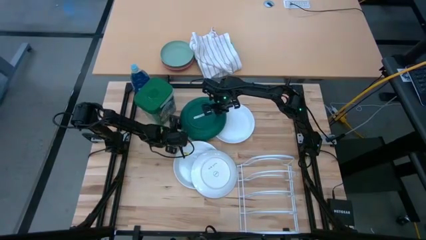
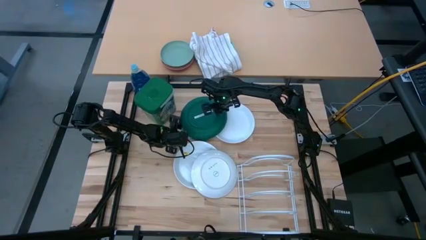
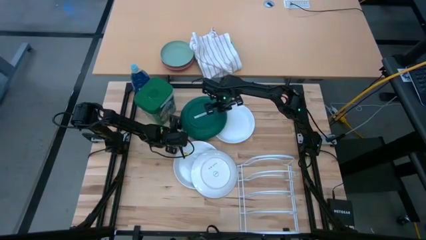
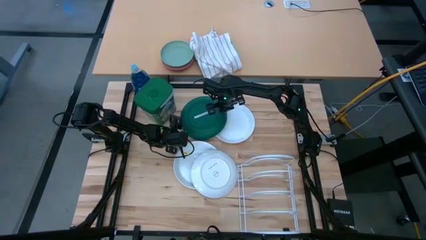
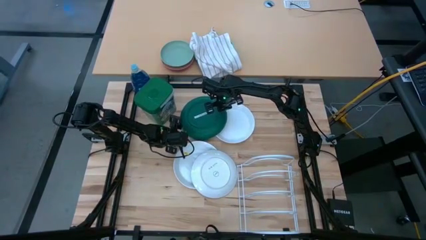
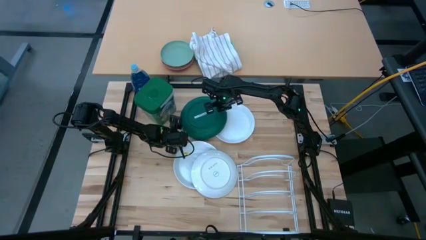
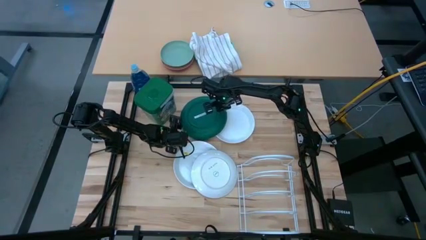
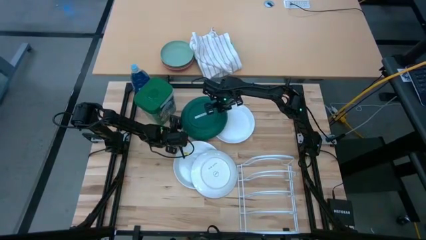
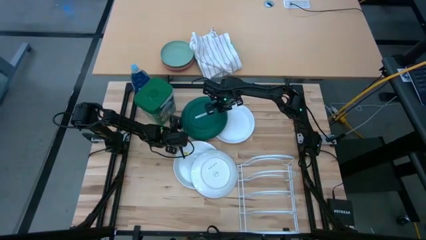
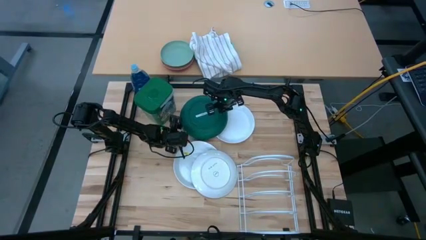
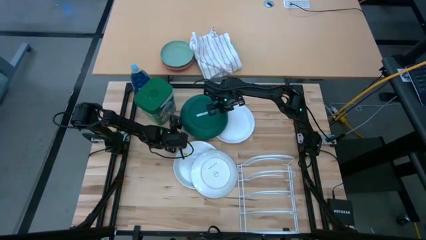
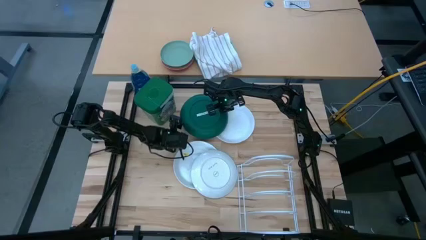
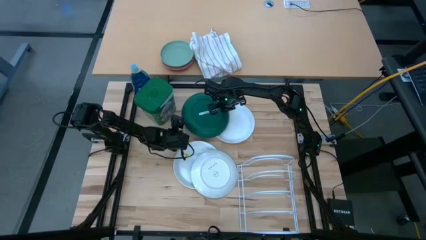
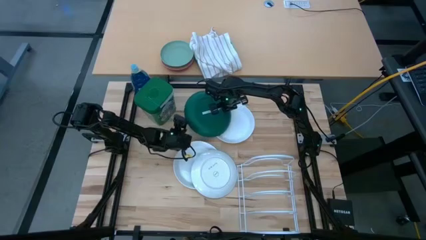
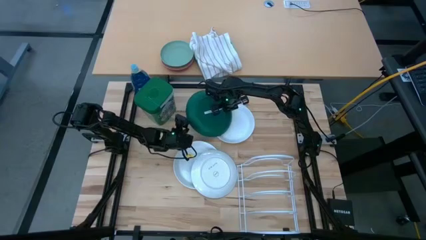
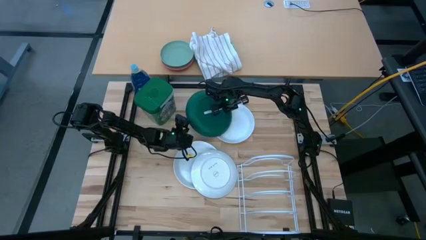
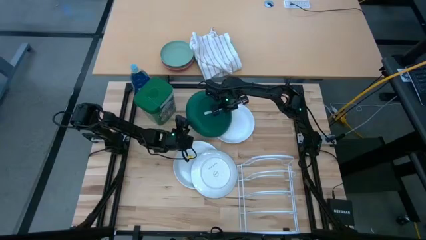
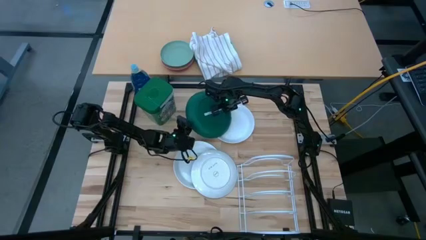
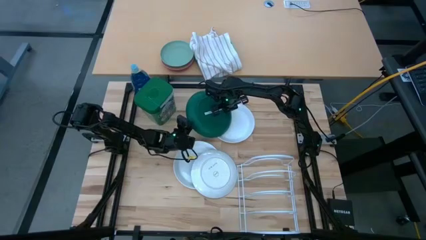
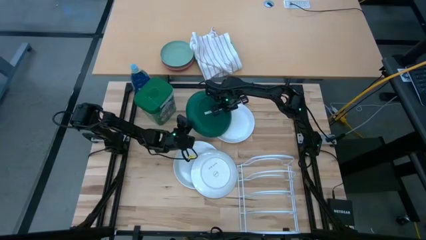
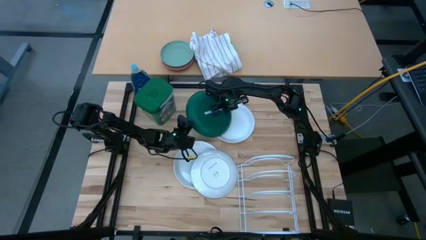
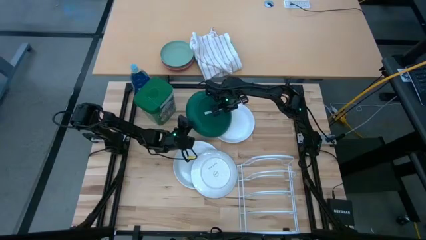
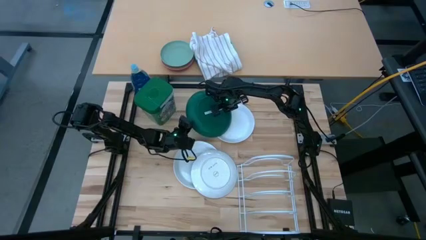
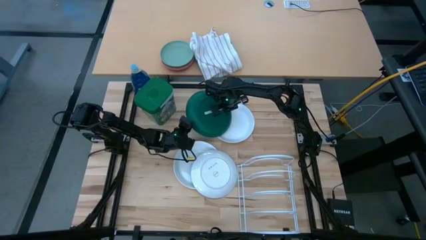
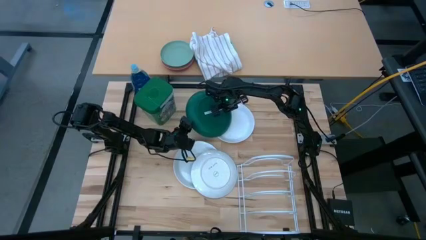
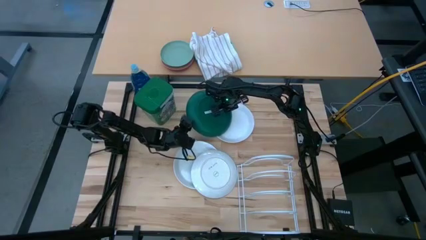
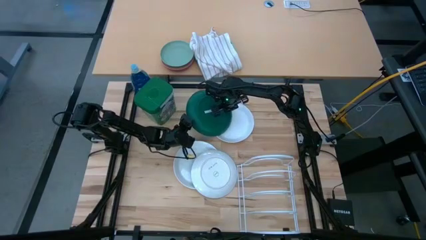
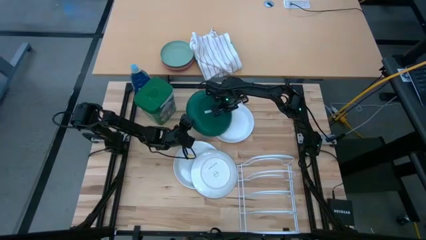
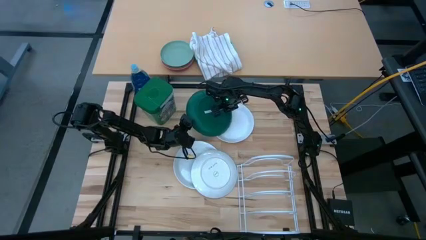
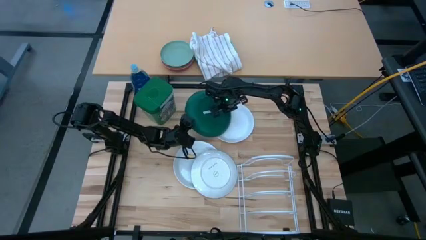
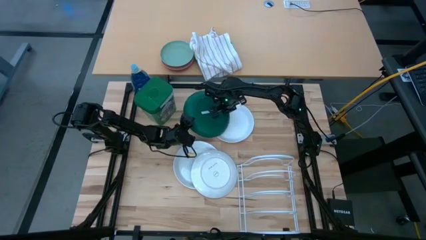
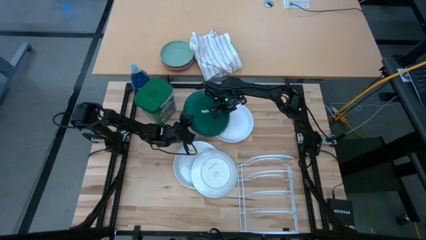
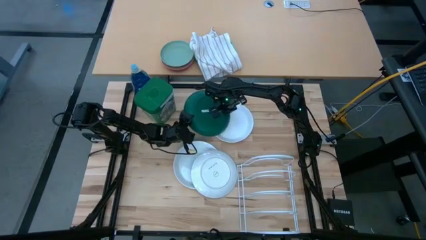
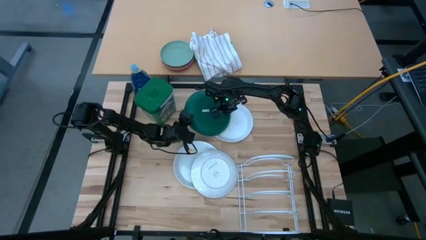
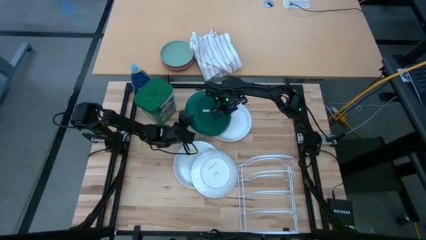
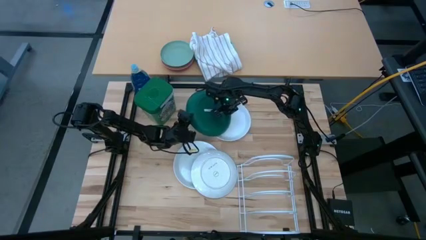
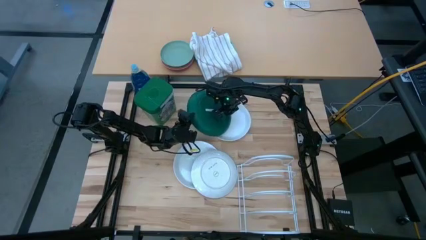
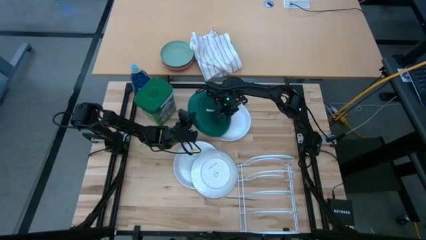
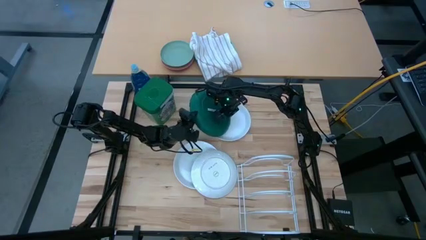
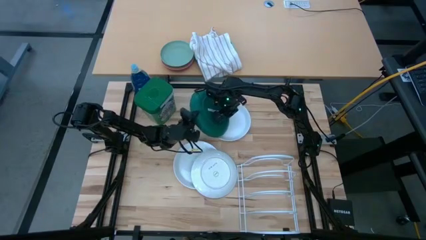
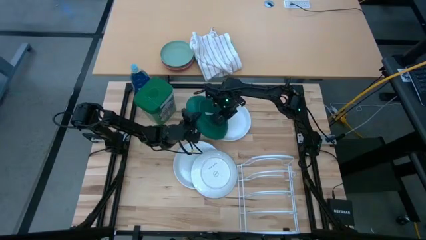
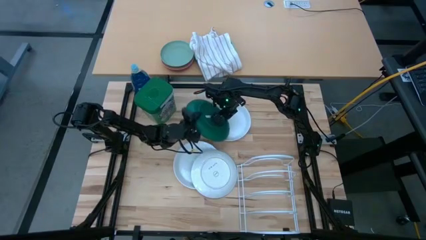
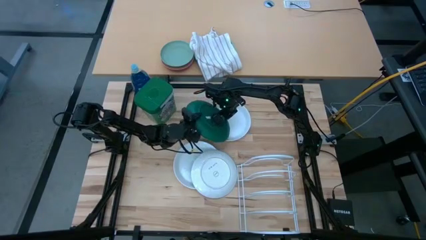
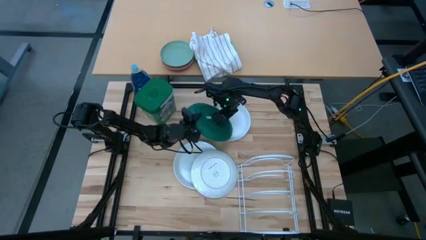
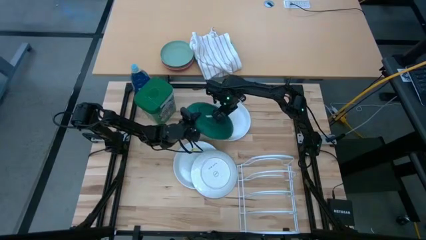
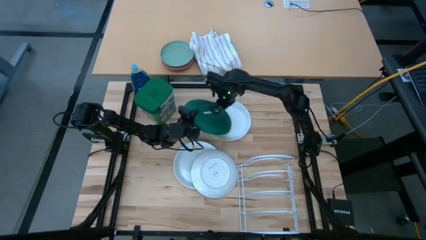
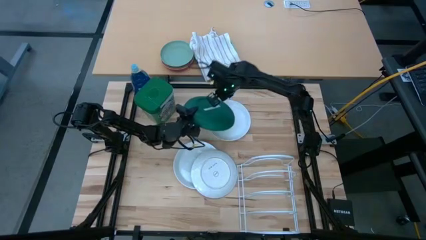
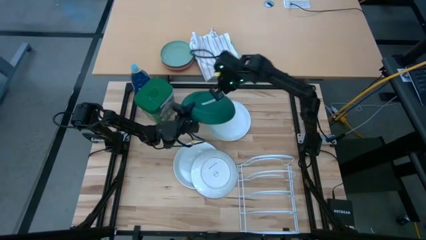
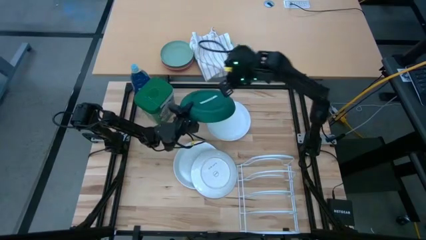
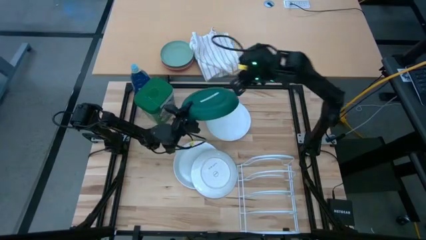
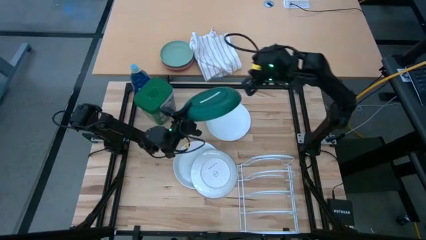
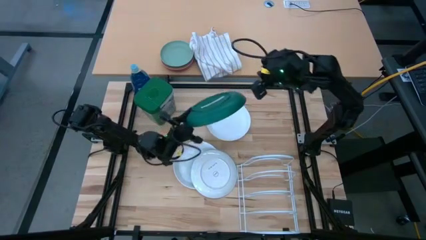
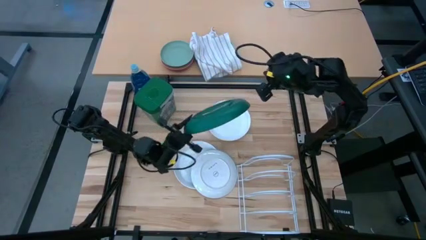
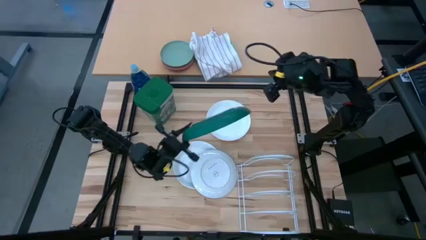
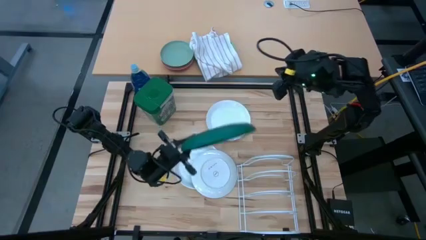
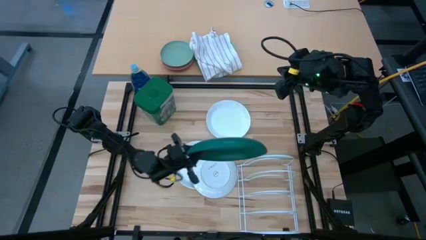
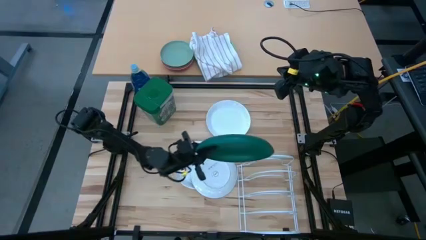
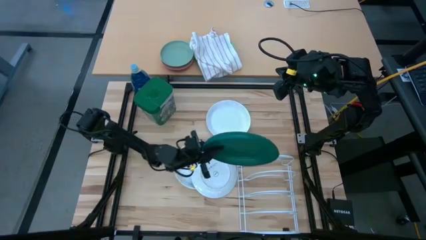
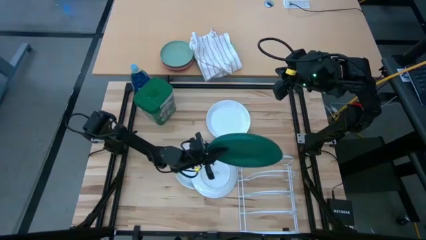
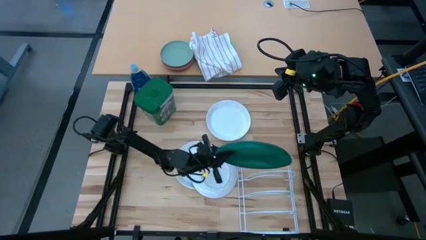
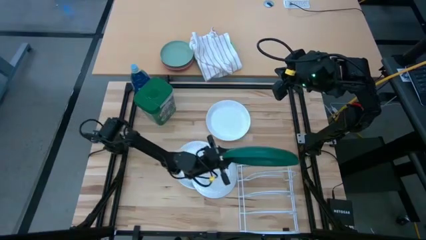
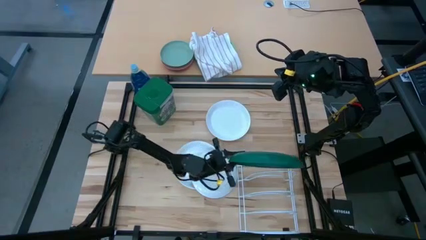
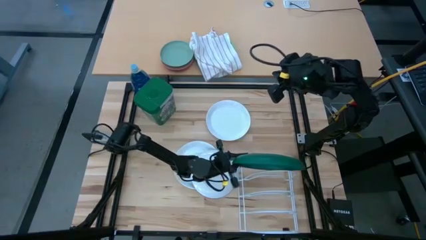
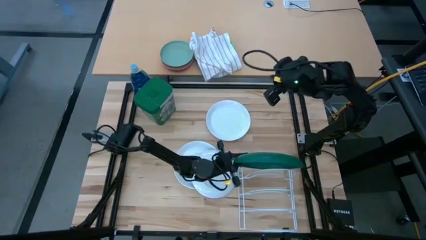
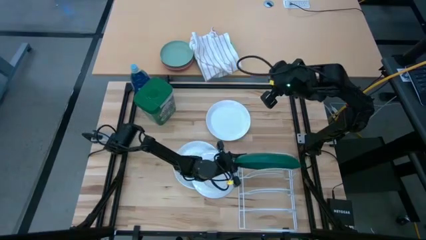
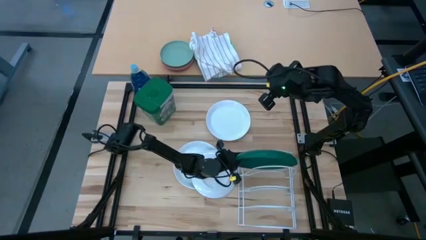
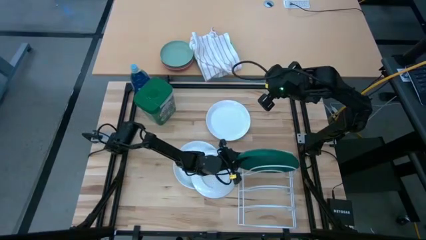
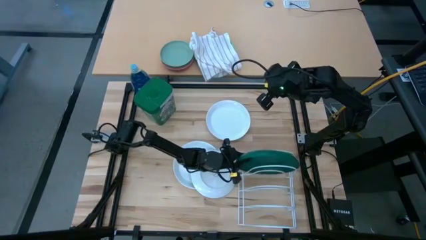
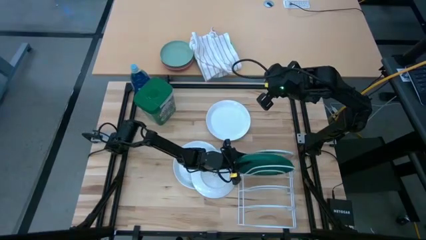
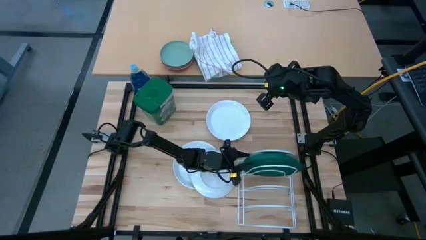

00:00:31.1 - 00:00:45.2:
Task: Sort dishes
Put the green plate on the dish rack

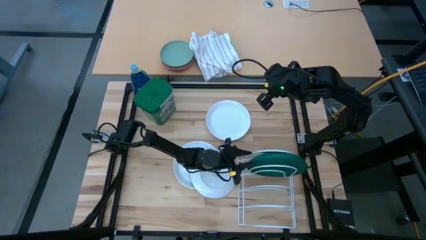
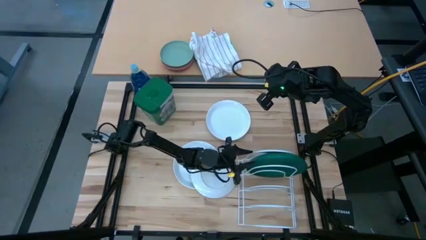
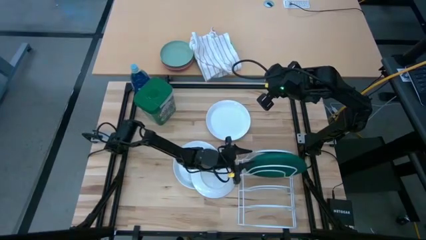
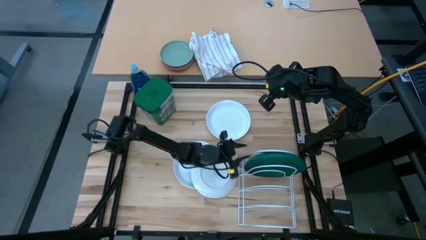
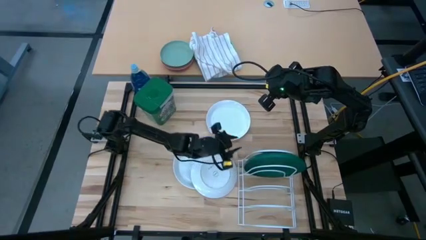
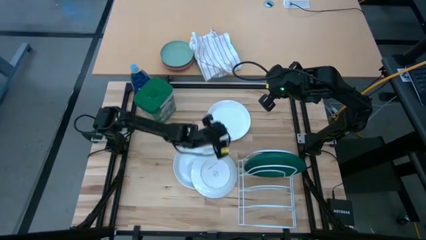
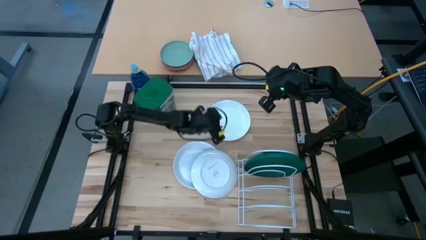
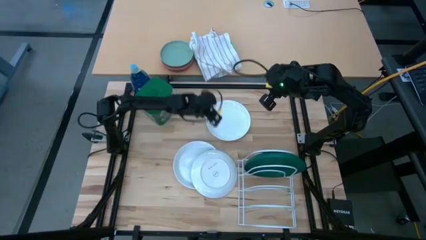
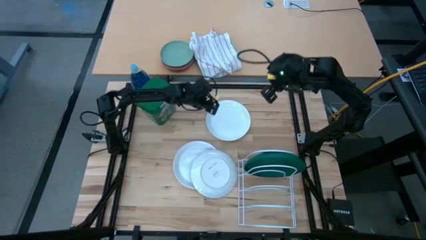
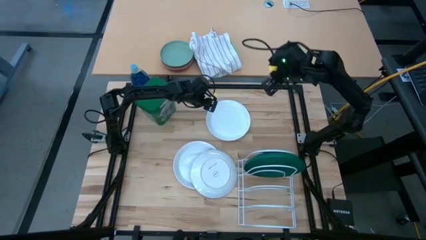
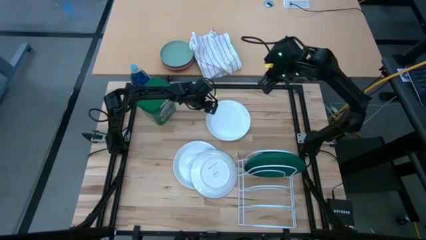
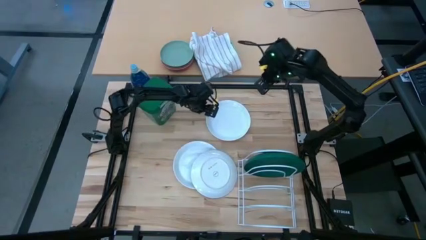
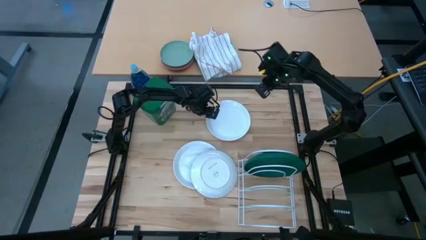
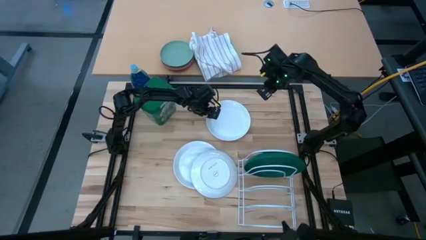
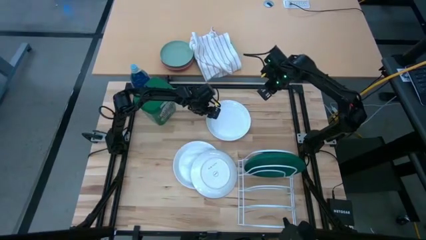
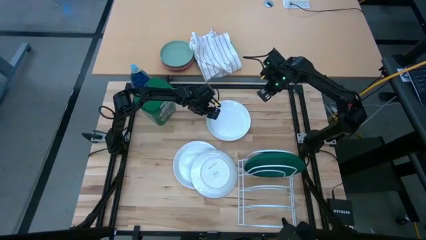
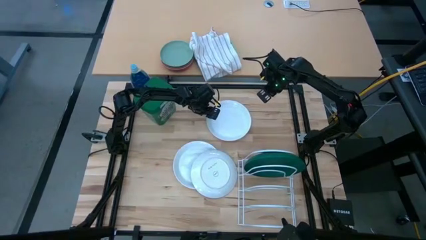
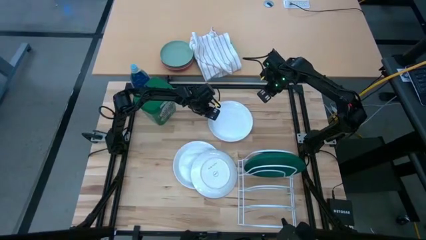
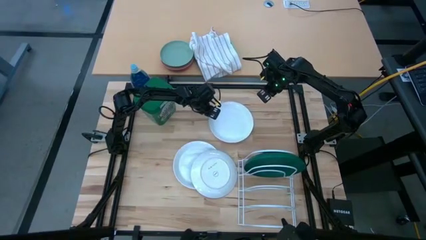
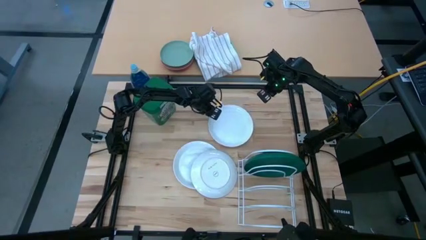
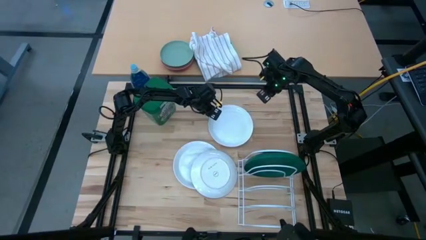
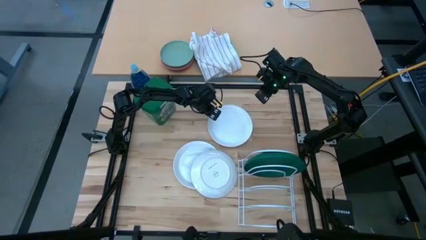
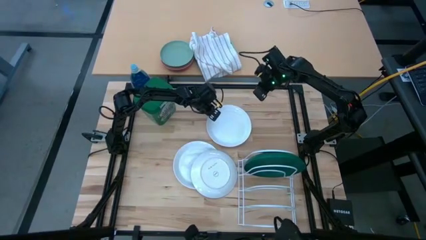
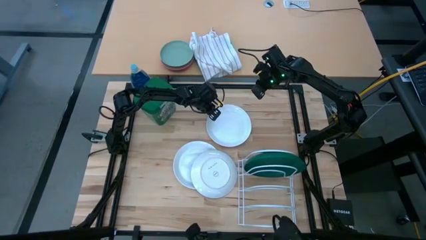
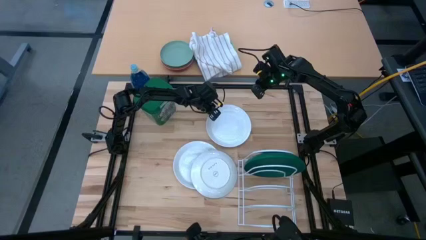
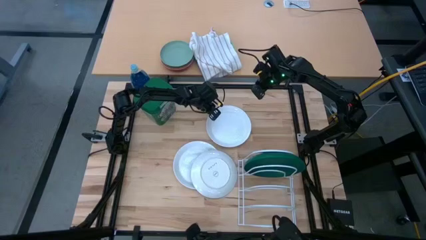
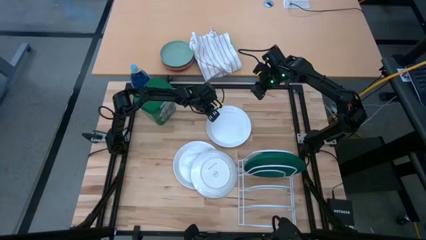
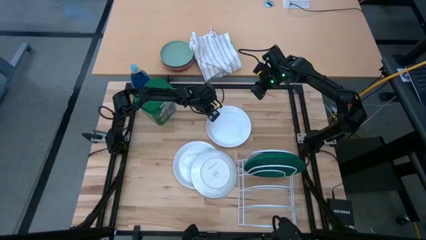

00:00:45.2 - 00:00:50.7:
Put the top white plate on the dish rack
